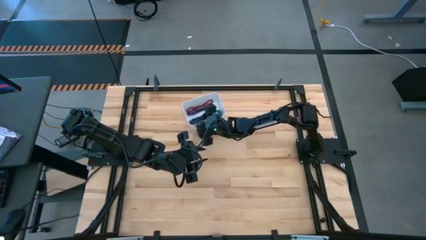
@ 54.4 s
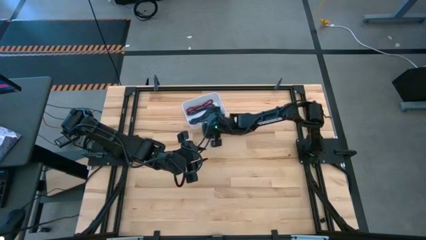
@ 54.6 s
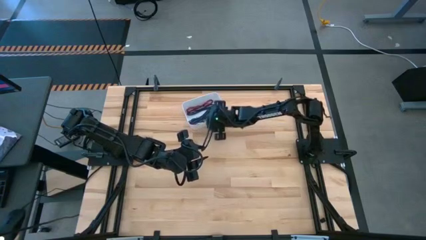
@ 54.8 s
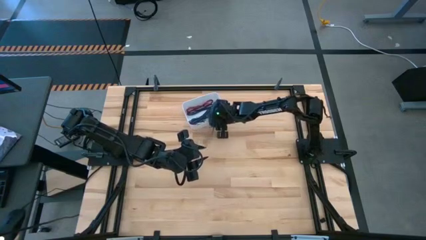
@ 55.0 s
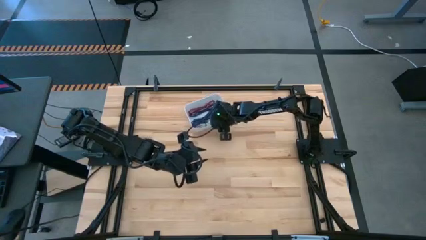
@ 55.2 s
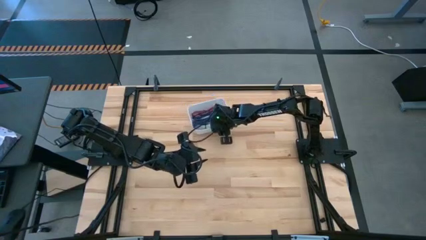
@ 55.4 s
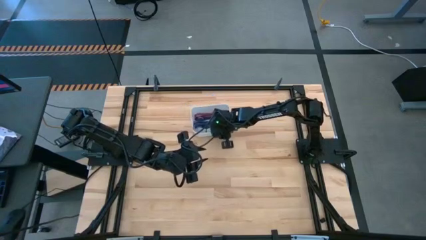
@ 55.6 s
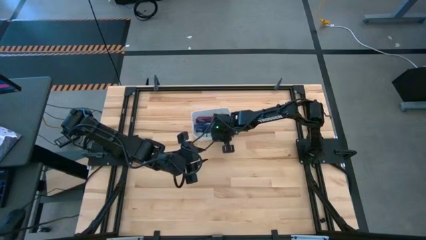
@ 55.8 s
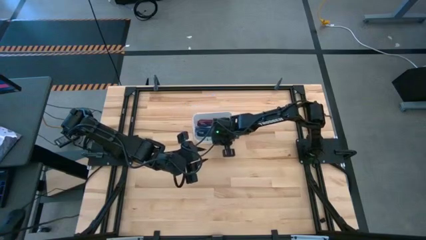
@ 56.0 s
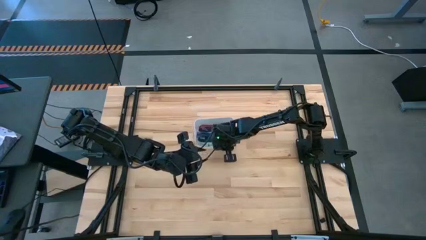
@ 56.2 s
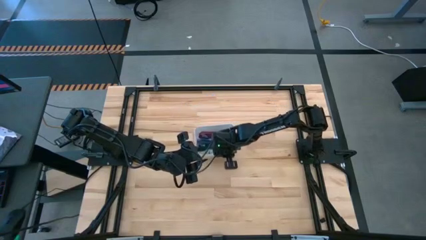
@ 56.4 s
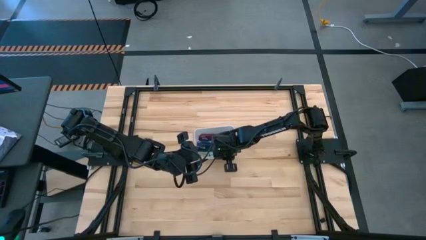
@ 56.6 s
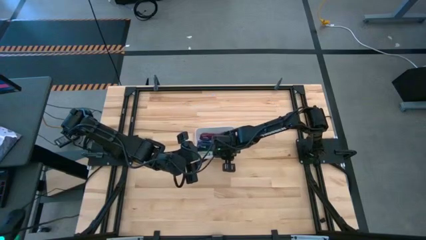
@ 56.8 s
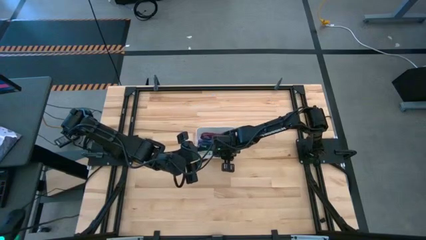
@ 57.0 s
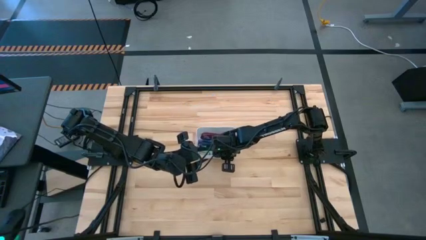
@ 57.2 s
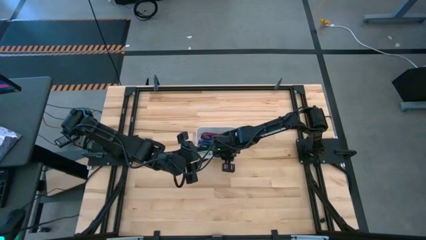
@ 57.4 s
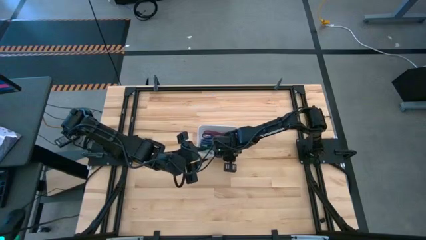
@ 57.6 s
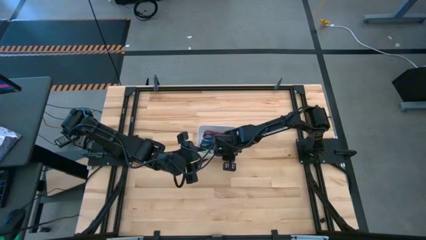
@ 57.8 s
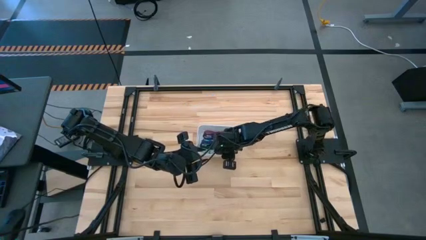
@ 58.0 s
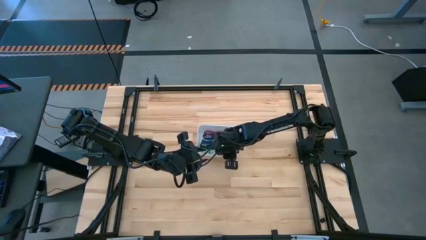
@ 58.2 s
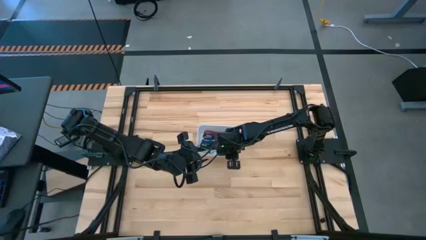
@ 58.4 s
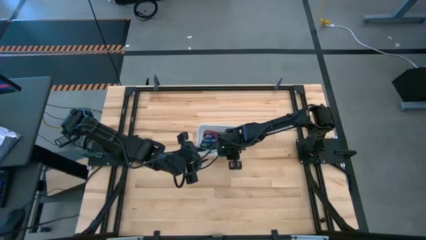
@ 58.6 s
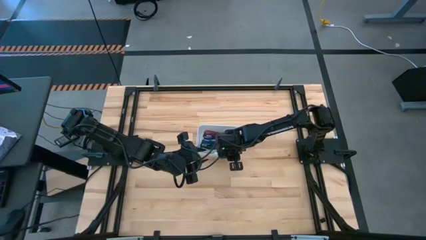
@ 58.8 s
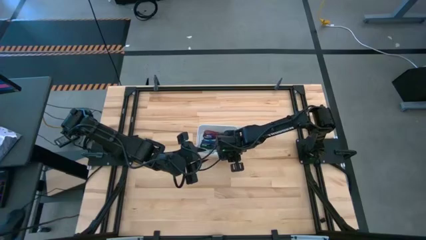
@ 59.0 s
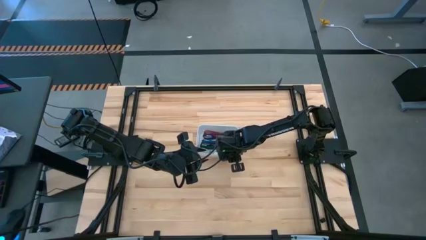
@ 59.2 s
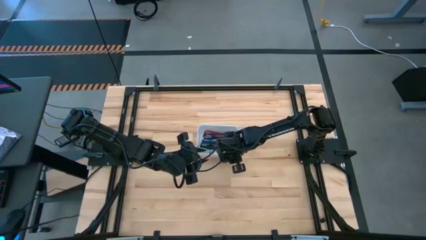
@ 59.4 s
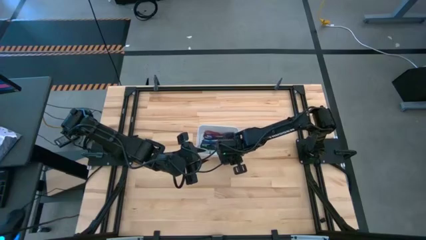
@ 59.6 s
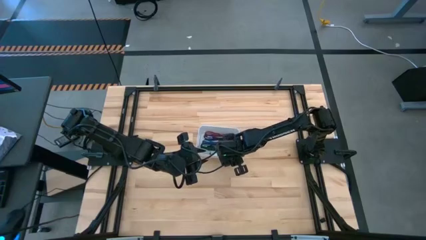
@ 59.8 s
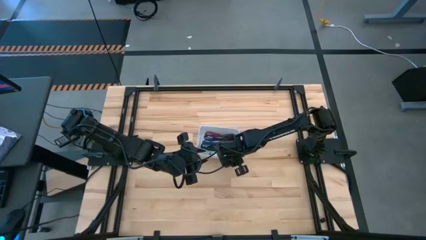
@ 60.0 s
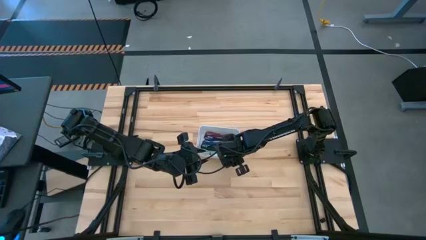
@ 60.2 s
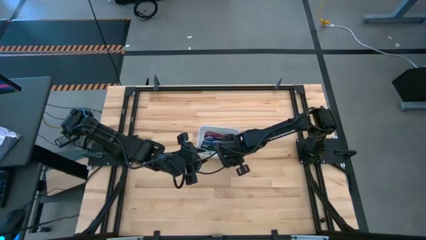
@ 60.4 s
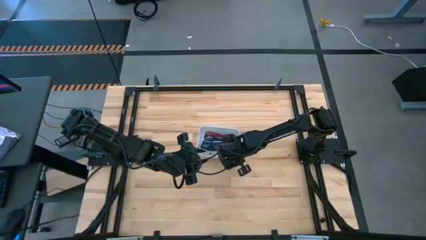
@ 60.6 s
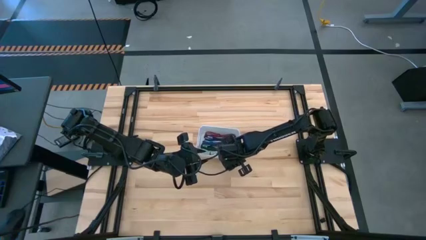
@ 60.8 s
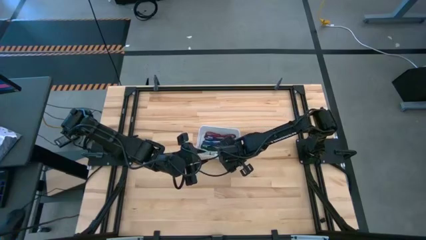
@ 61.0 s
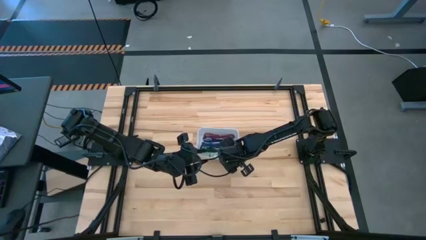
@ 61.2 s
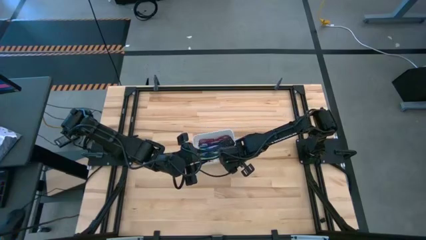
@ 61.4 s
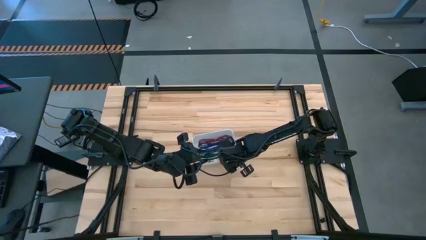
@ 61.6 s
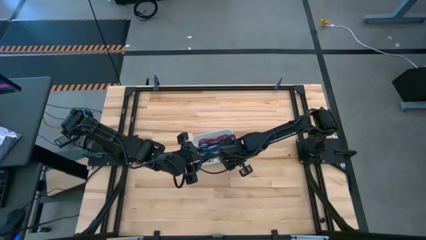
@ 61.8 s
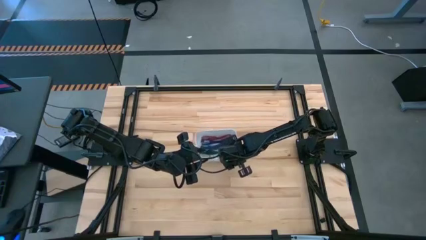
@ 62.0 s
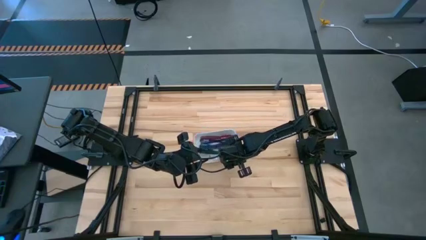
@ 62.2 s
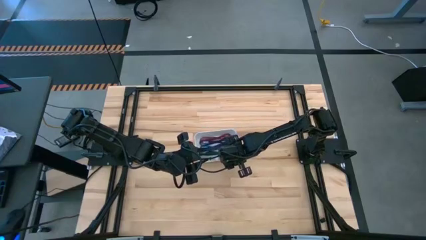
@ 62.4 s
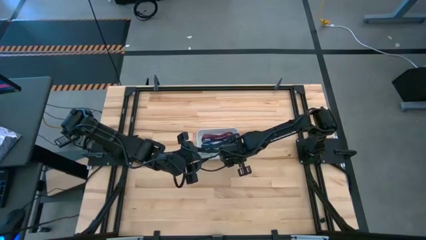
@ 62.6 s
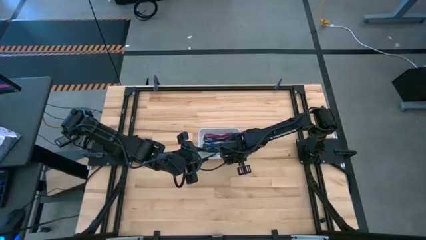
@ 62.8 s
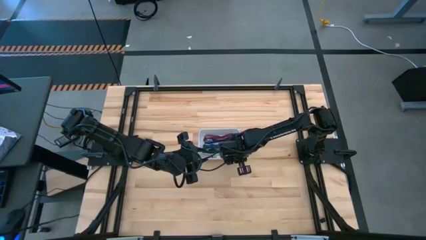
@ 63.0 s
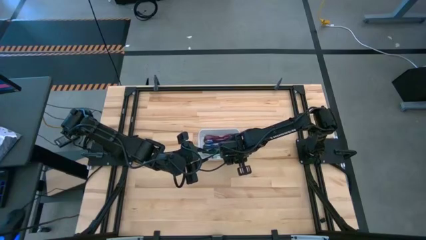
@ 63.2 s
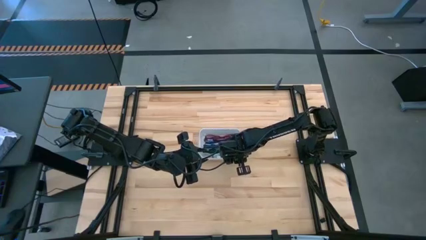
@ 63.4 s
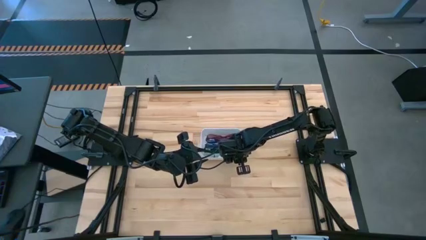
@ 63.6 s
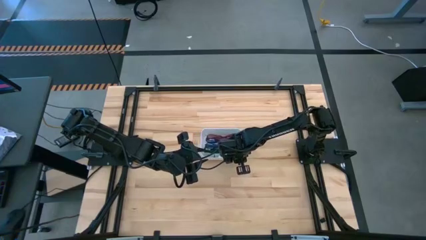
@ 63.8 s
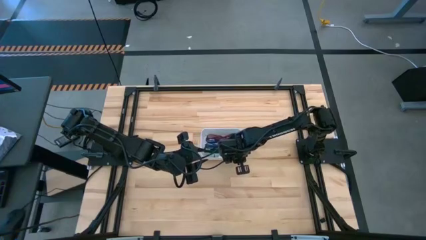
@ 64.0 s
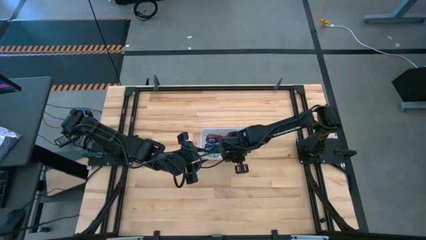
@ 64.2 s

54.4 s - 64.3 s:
Task: Pick and place USB-C Cables
Move the white bin to the center of the table

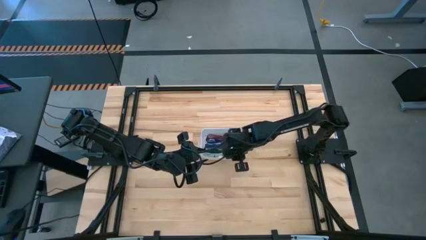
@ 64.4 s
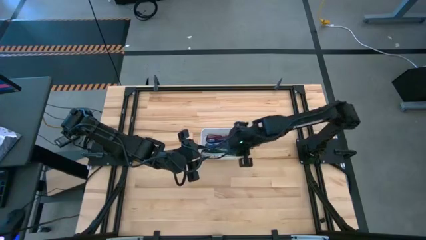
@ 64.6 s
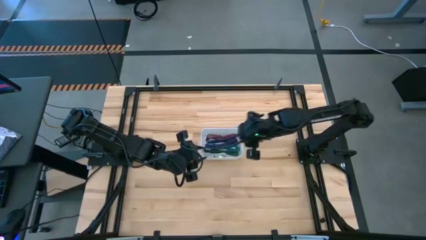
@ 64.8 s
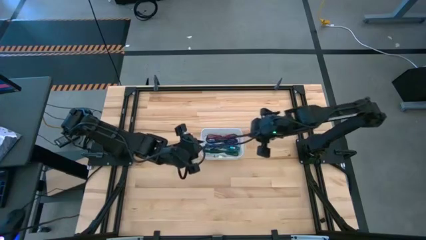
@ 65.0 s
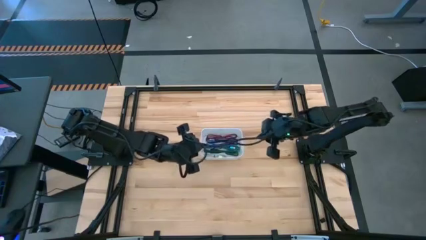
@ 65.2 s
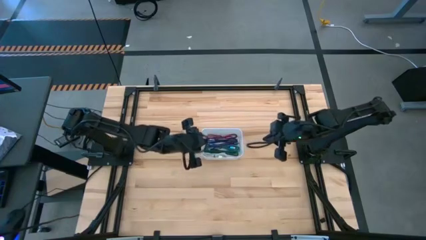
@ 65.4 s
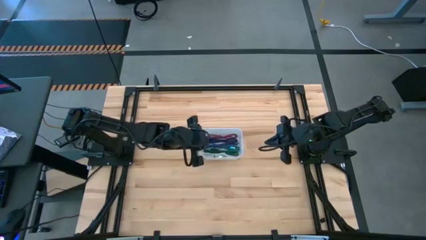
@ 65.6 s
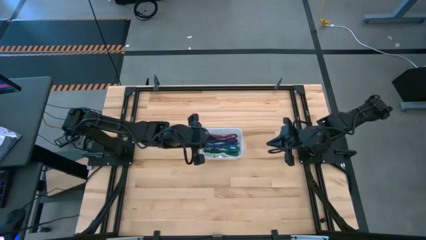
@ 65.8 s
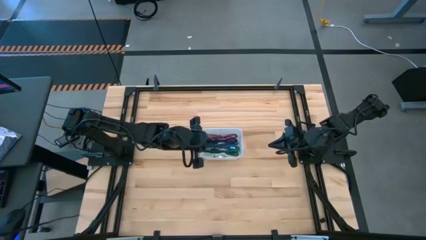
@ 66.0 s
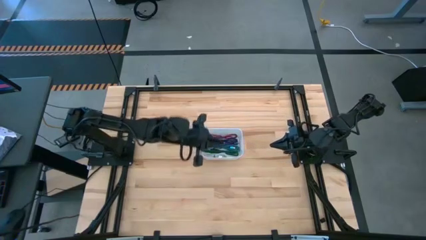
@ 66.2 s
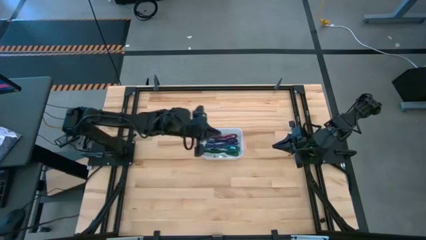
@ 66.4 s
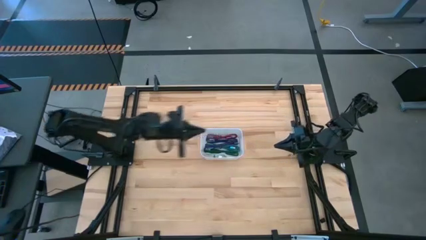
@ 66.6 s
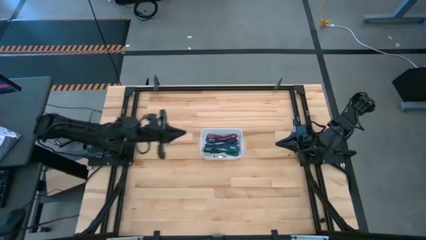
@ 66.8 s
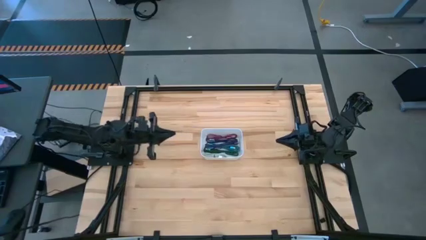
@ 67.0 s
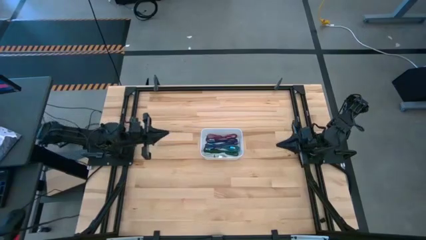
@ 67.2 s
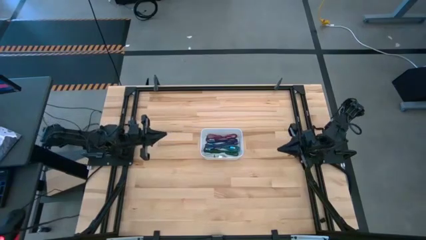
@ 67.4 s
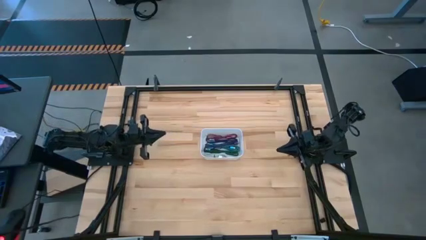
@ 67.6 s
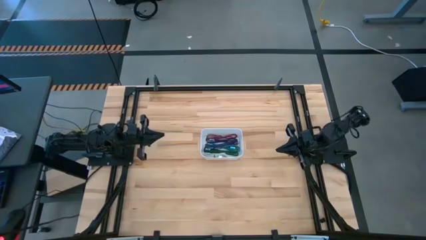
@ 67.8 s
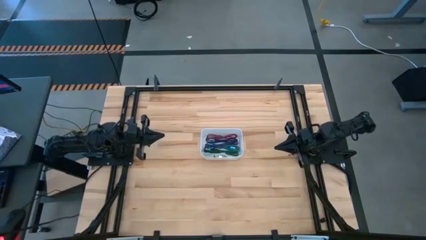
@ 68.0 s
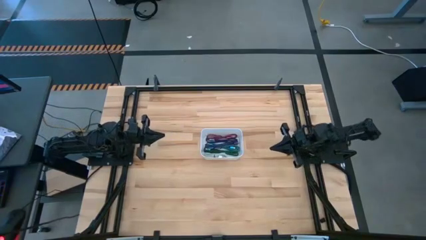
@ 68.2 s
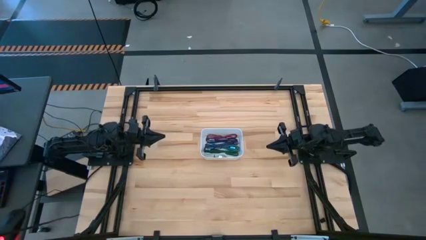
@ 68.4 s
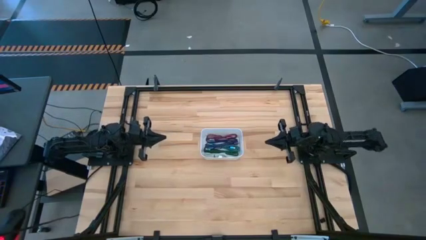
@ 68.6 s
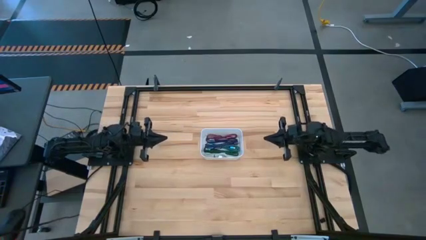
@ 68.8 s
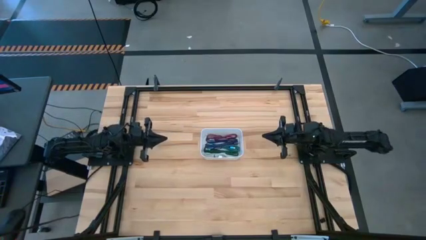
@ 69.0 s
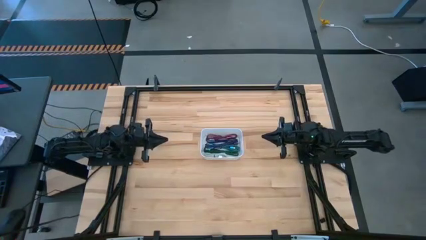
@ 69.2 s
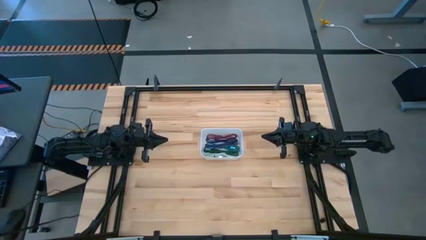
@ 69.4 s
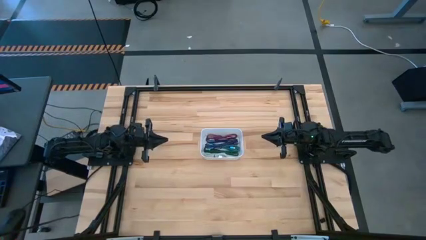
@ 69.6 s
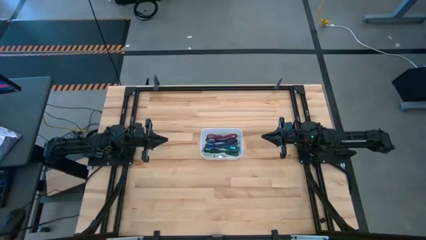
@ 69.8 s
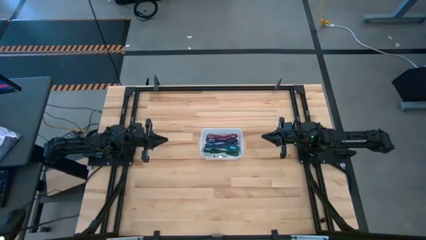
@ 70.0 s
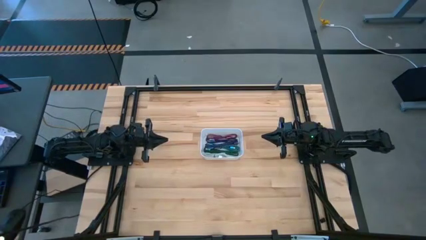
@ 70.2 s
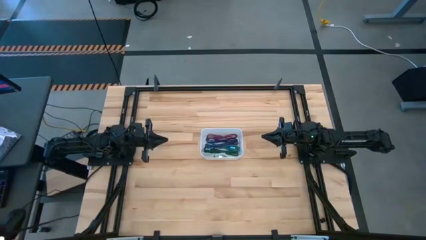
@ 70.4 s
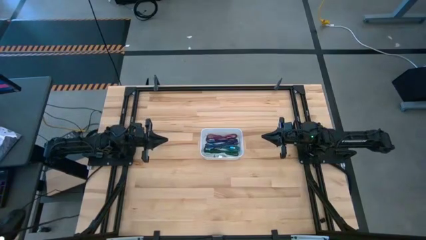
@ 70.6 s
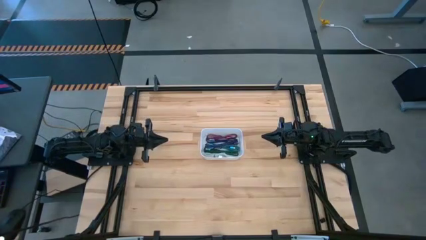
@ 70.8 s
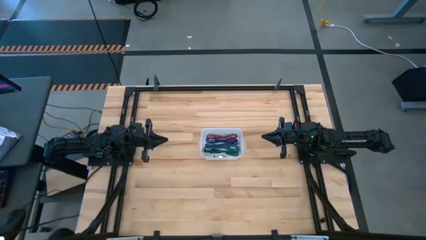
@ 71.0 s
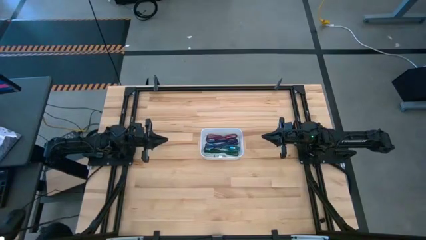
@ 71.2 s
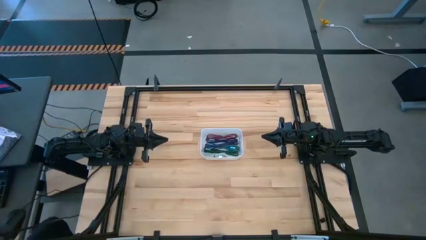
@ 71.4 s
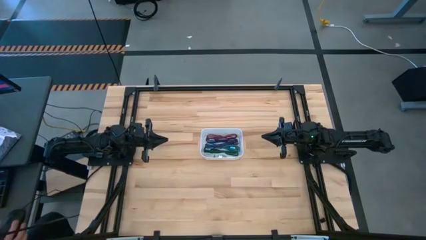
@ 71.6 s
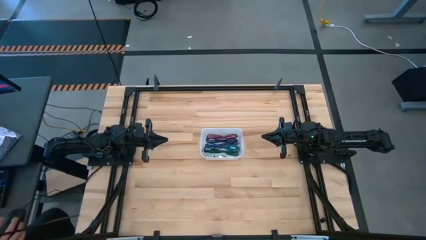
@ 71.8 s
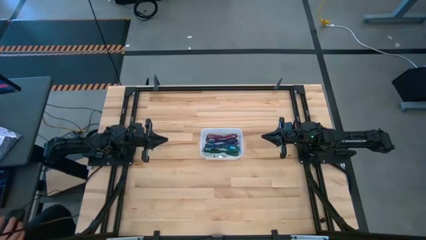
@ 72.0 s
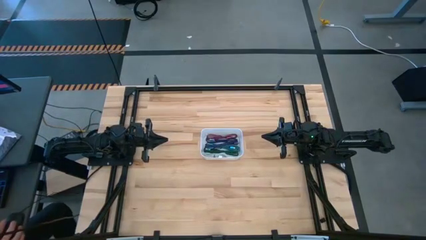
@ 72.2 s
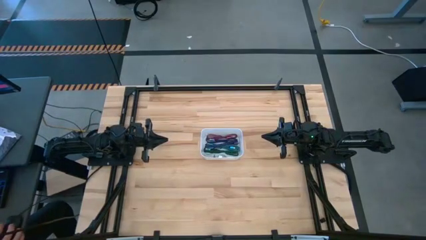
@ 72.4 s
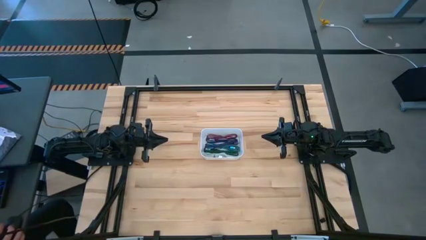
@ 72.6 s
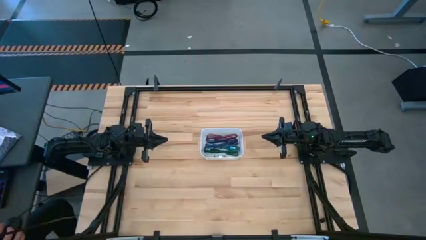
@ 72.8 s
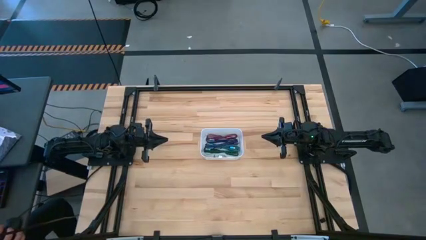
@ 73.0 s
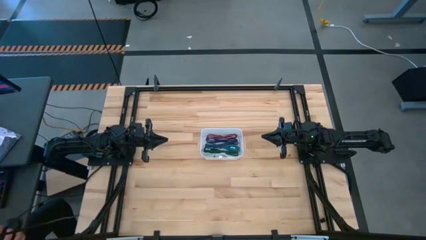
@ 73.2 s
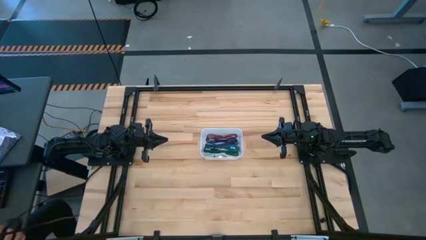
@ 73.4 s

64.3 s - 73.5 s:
Return to Home Position
